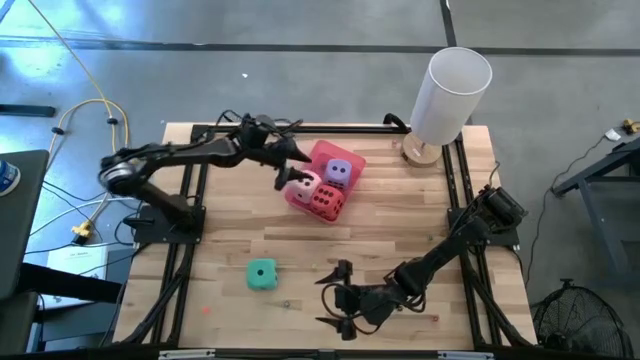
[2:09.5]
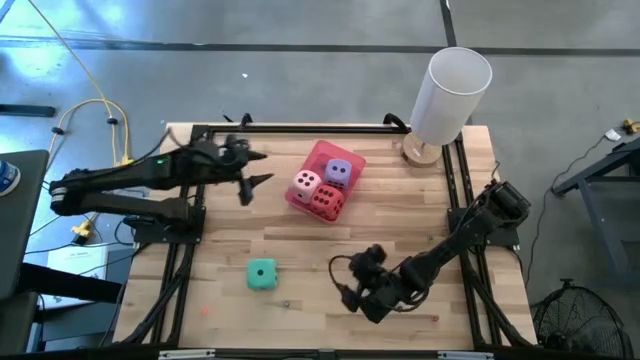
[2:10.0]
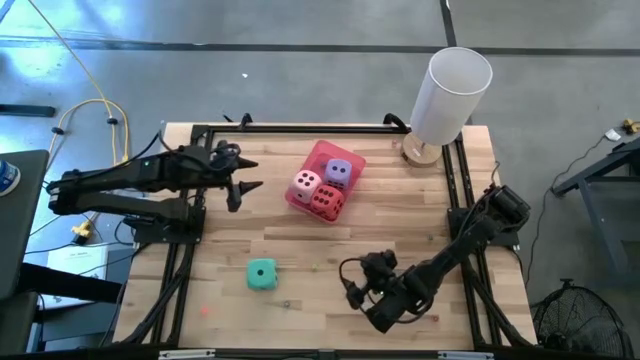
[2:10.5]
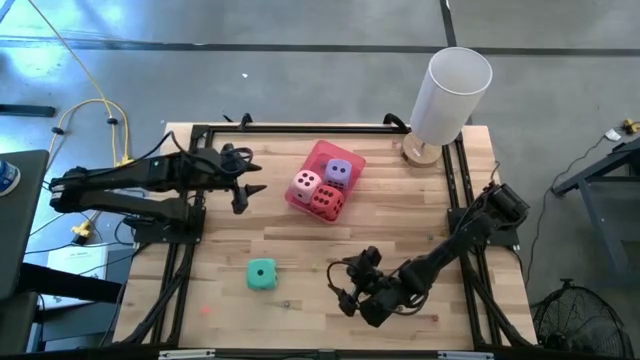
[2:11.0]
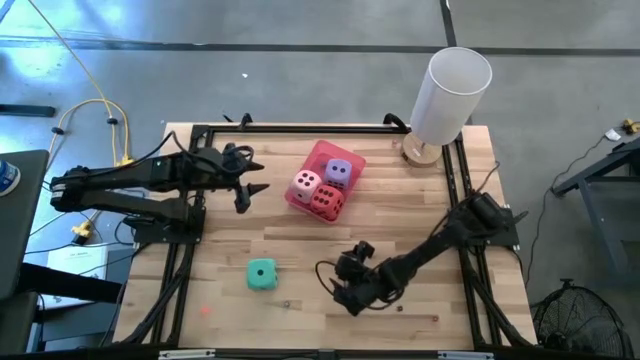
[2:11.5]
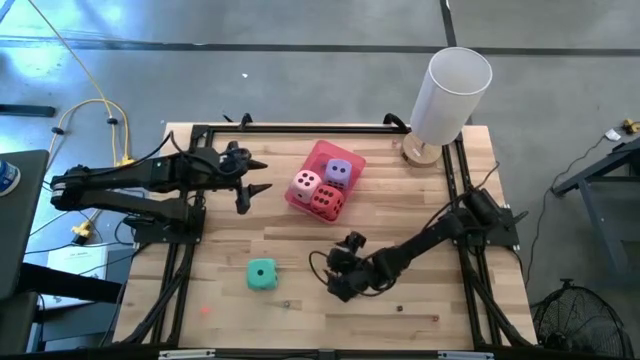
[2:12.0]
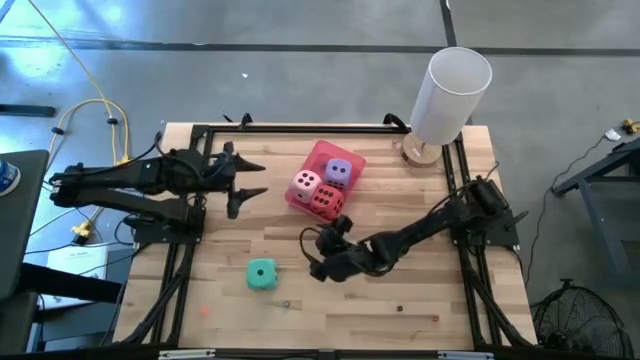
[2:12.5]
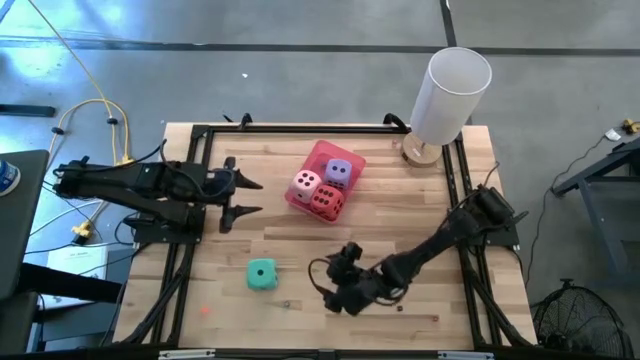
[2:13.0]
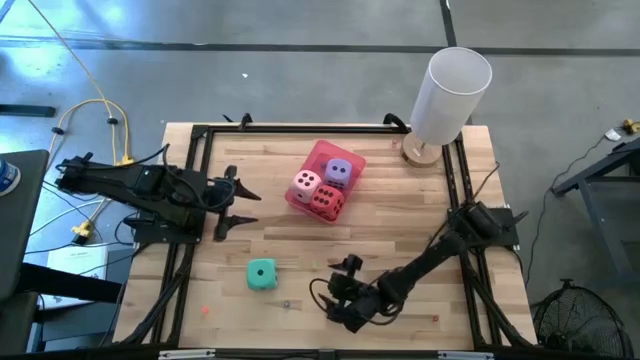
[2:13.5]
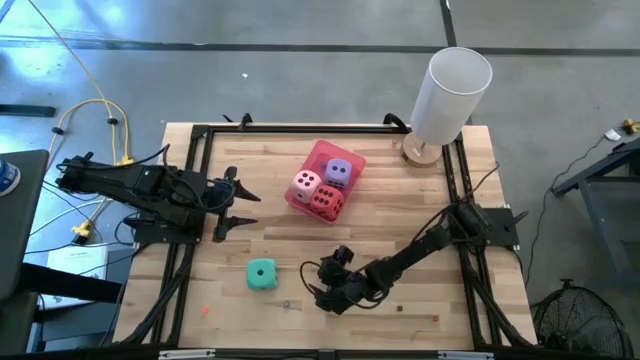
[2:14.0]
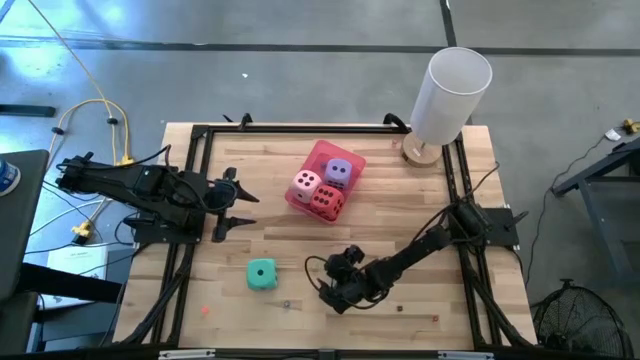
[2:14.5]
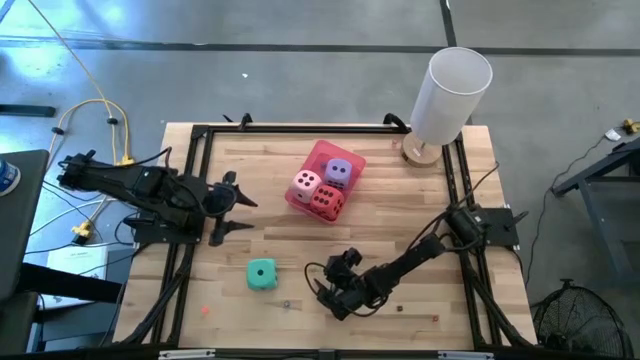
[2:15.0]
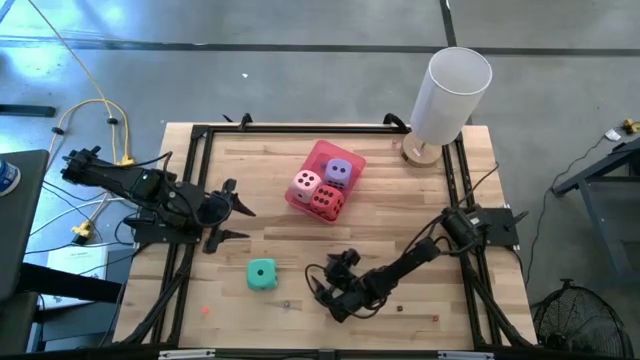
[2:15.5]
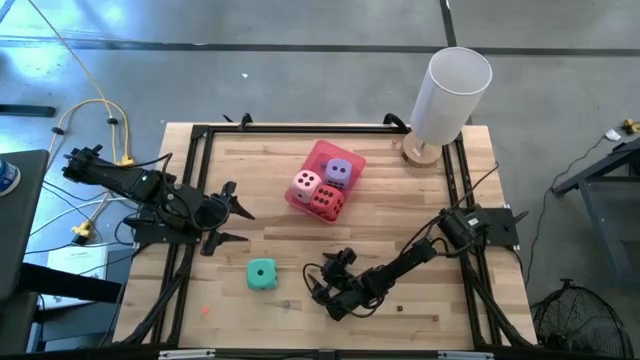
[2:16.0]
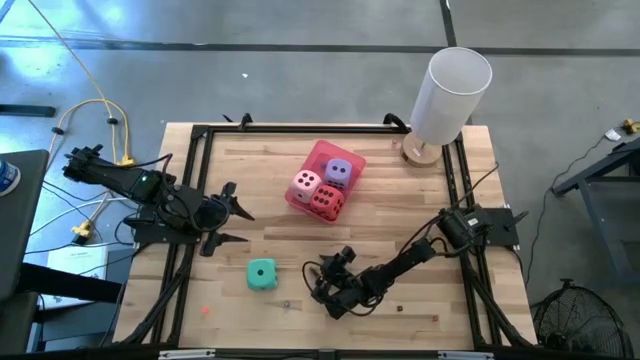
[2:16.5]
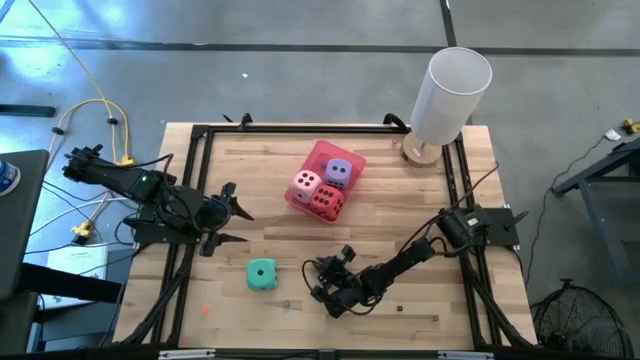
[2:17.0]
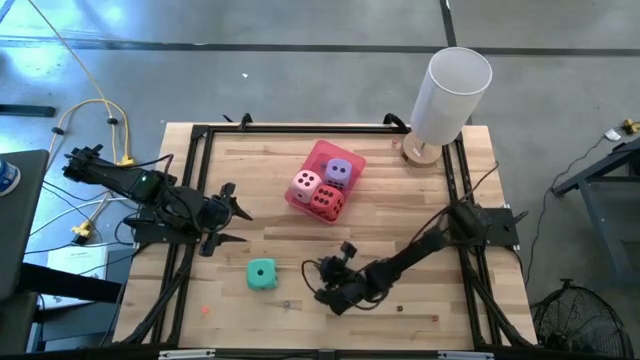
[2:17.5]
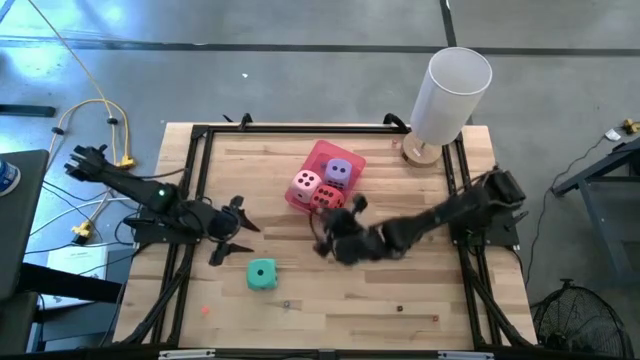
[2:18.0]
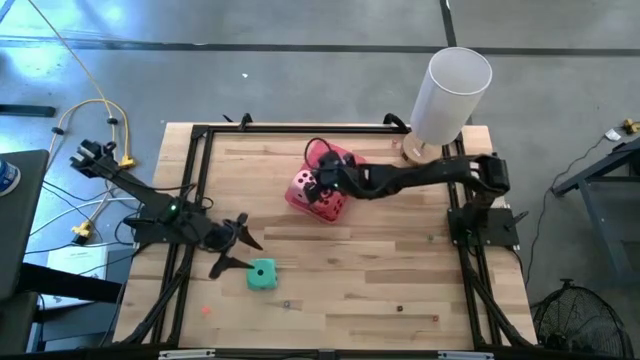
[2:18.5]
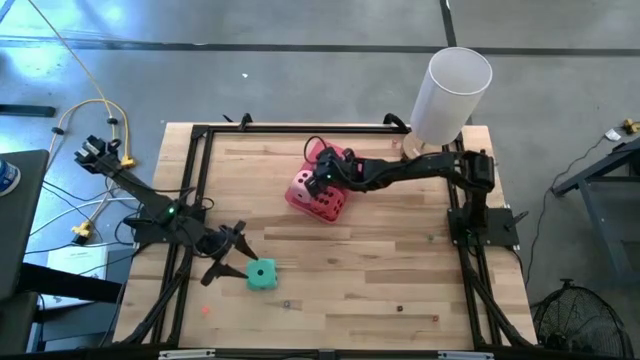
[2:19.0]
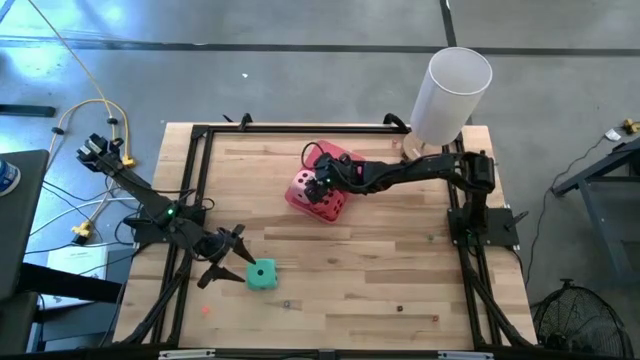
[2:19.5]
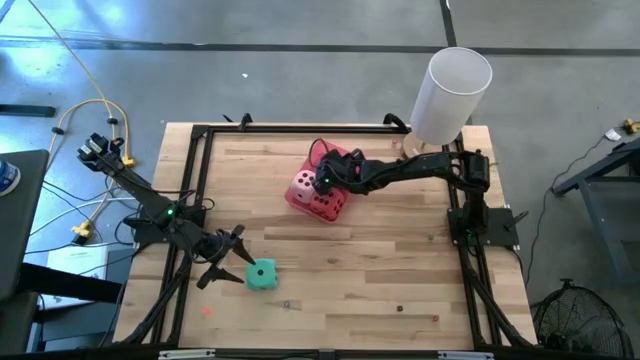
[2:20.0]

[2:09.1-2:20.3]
Task: Pick & Place Dice
Put the small light green die into the red bin

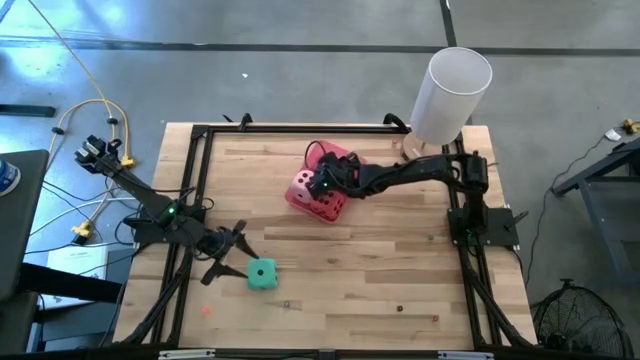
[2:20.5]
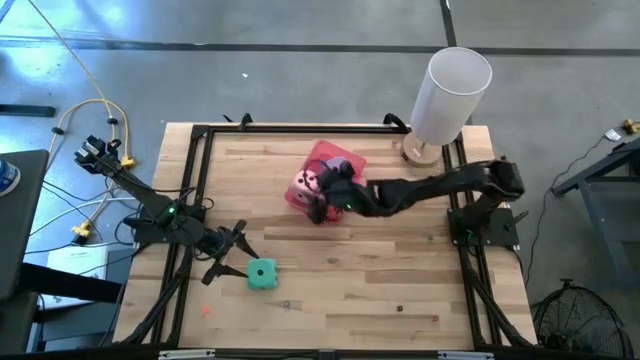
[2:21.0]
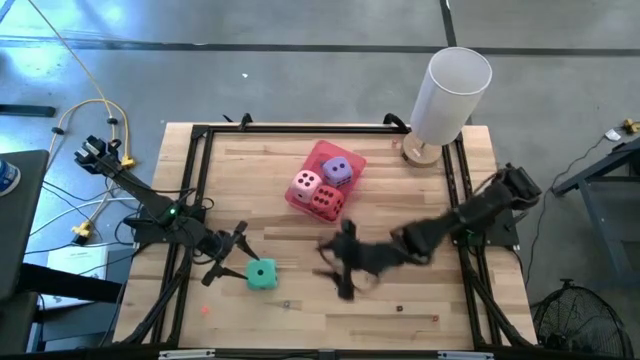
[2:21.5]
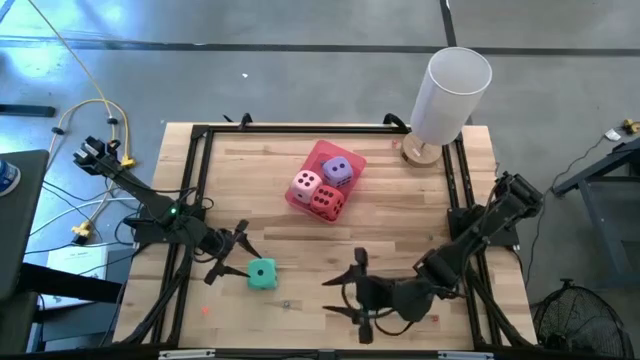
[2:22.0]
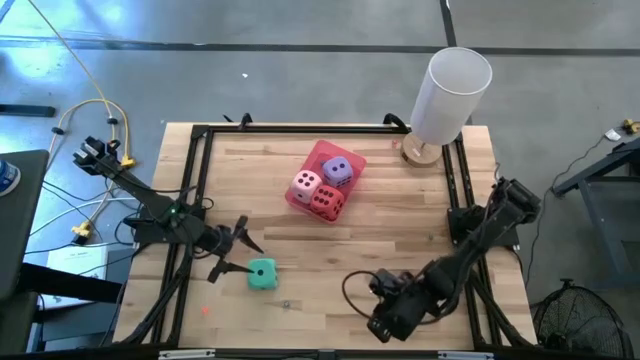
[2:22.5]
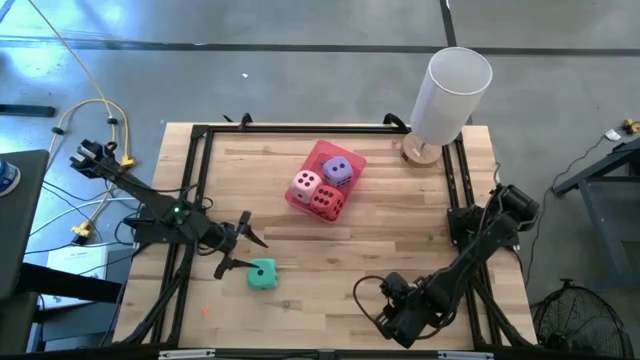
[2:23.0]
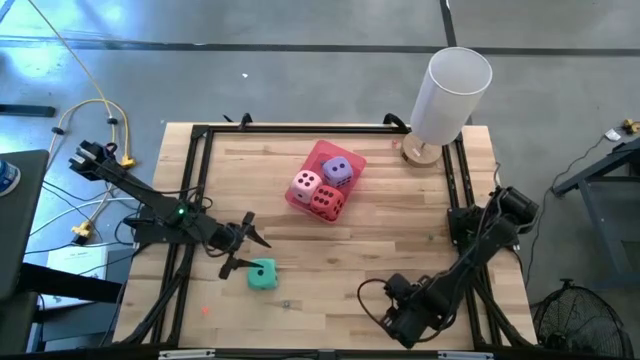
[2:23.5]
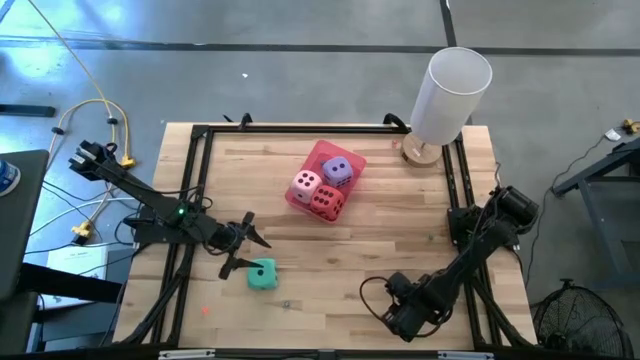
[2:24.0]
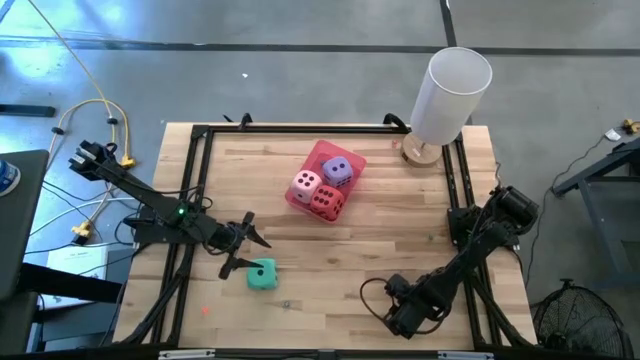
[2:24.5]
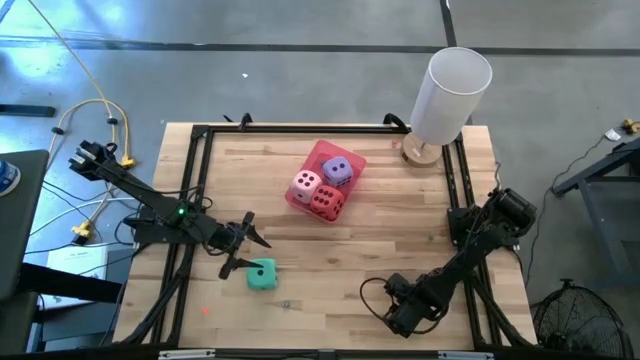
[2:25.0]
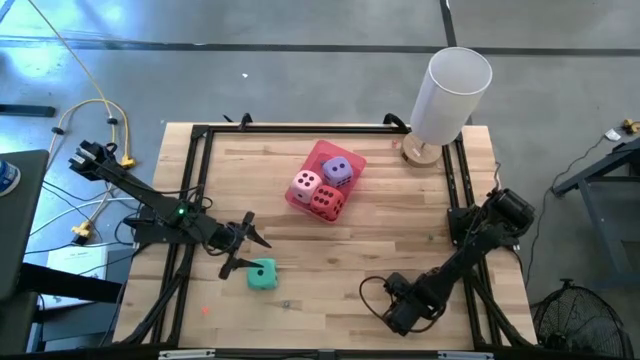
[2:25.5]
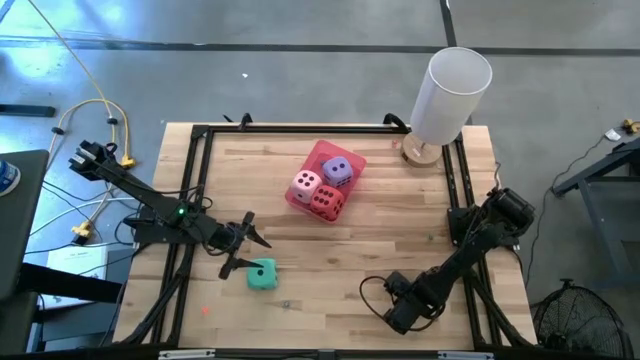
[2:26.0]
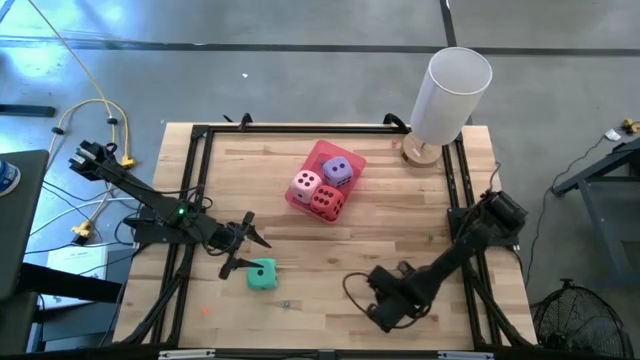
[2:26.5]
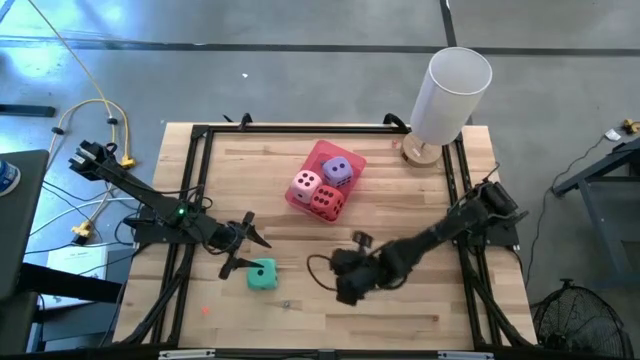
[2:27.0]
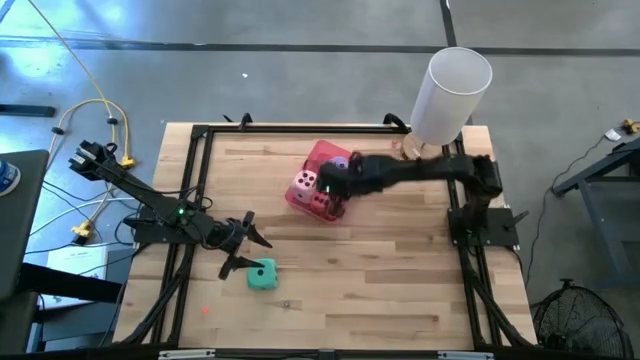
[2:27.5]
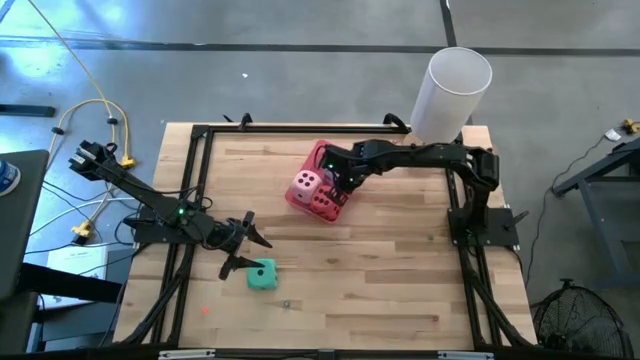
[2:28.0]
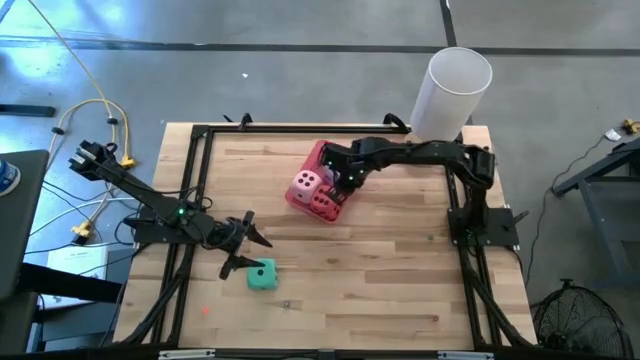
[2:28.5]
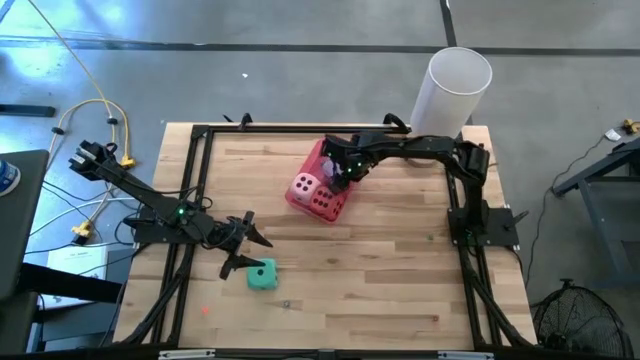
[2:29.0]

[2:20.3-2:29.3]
Put the small black die into the red bin
